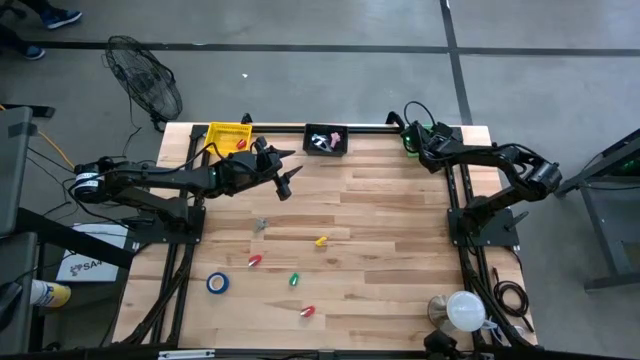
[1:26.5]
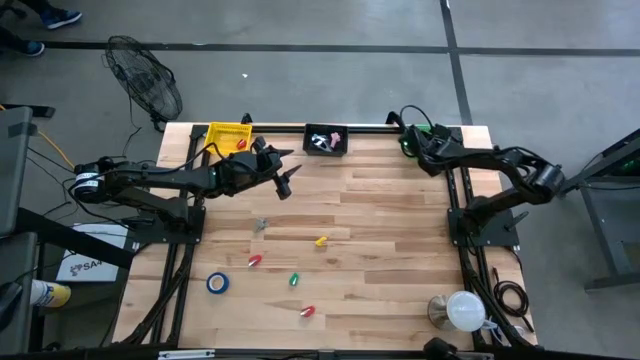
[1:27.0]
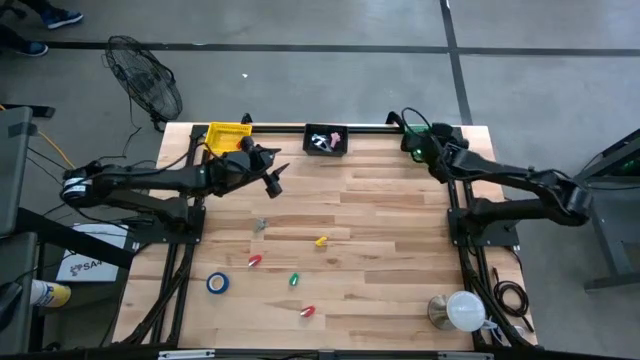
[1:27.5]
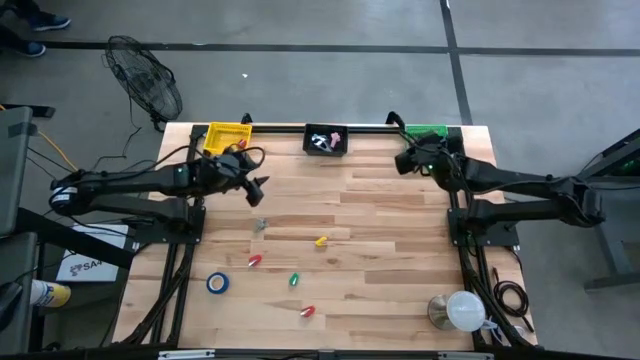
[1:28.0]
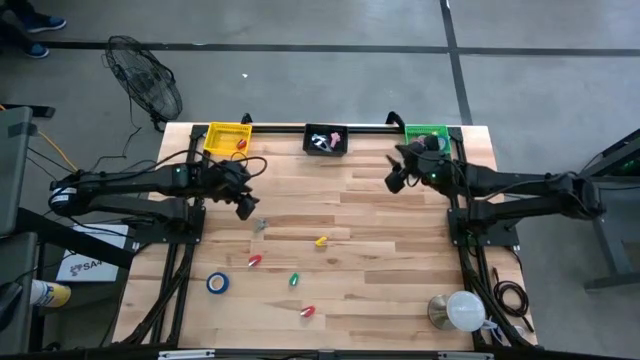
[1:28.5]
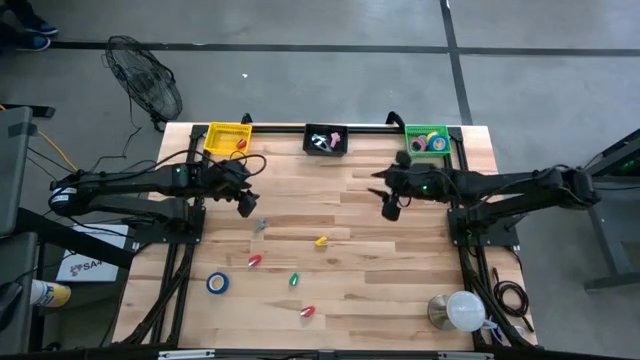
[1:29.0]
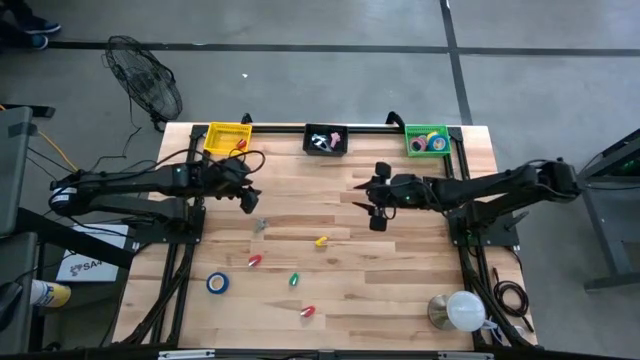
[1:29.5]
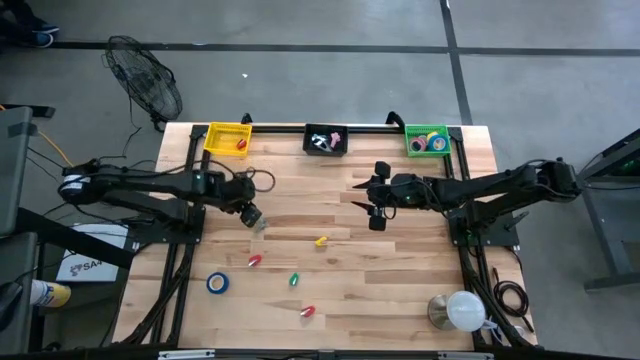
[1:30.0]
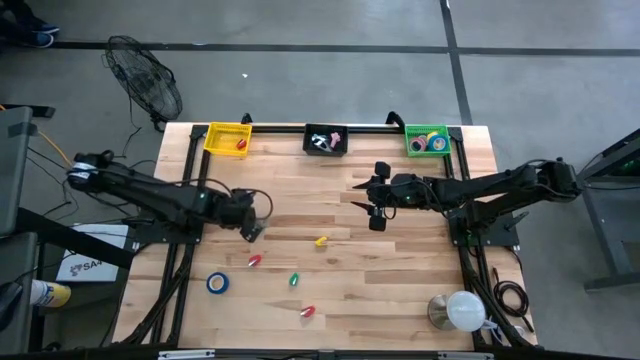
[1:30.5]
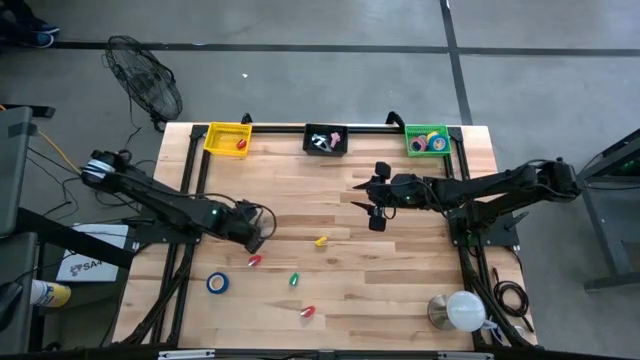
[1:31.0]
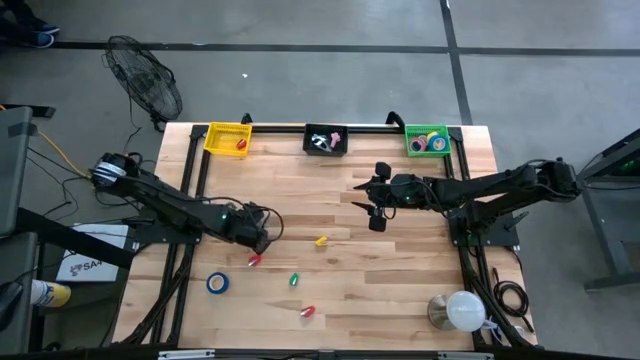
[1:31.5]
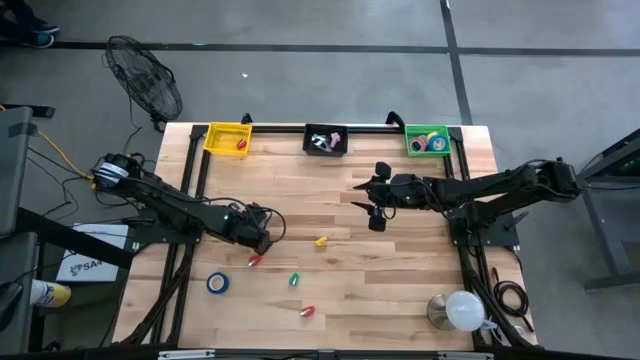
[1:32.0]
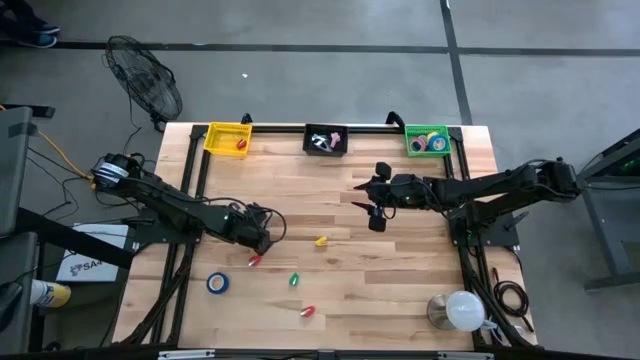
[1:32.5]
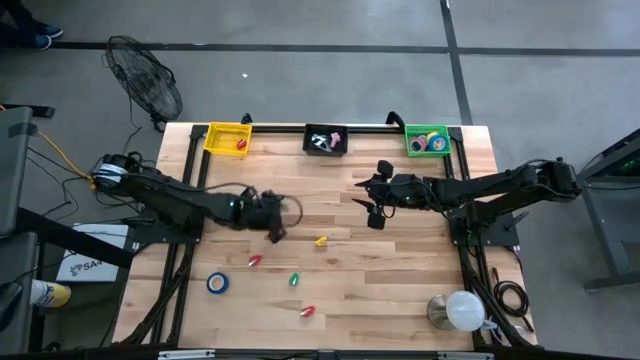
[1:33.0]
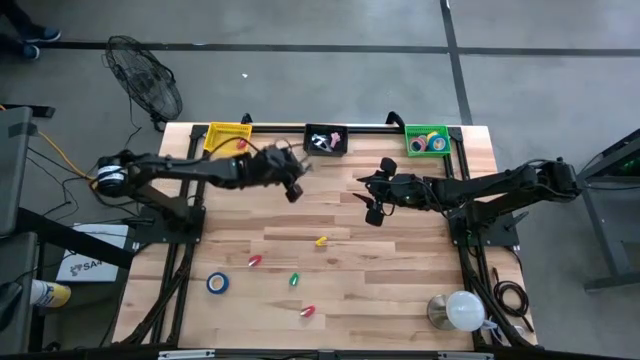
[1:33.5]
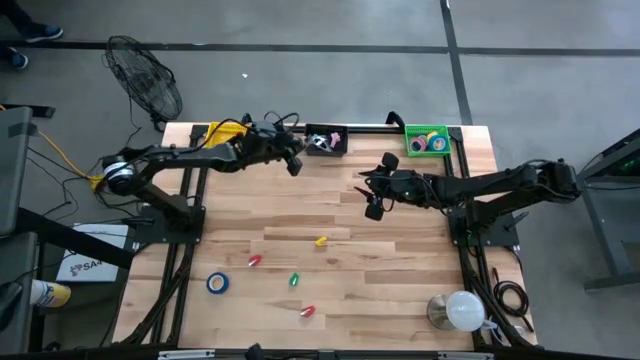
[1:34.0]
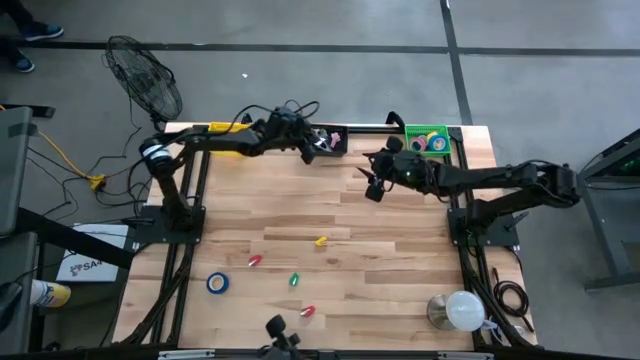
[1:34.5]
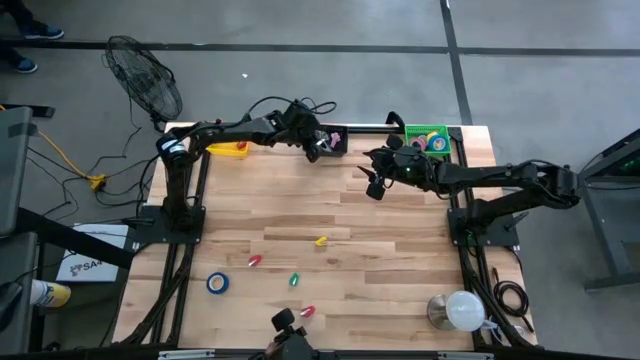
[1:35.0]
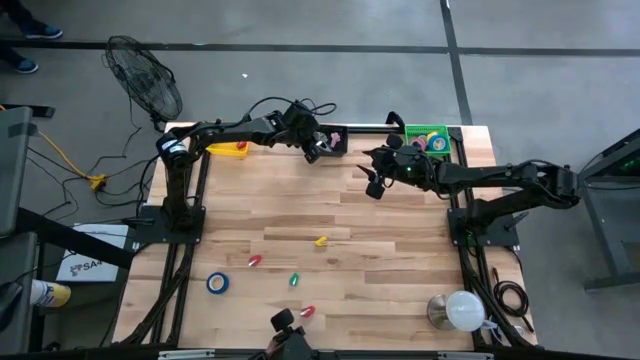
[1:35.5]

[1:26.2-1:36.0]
Task: Pick and place Stapler, Stapler remover, tape
Put the gray staple remover into the black bin

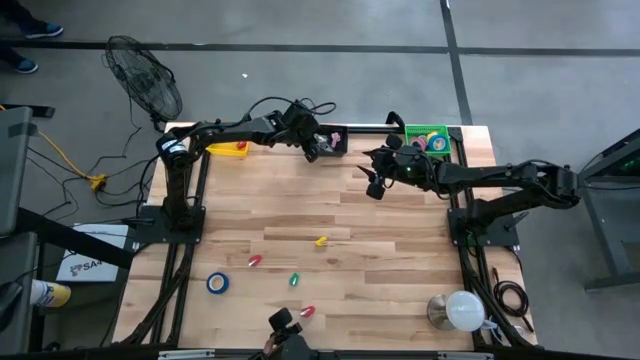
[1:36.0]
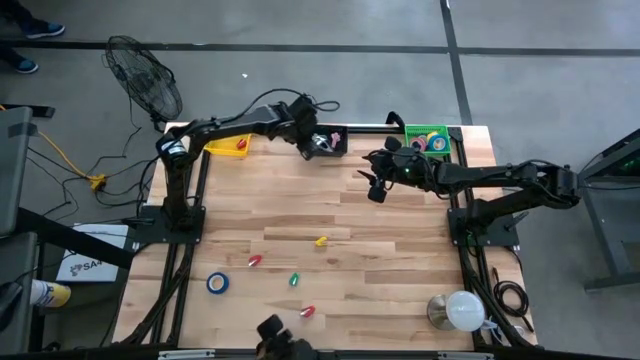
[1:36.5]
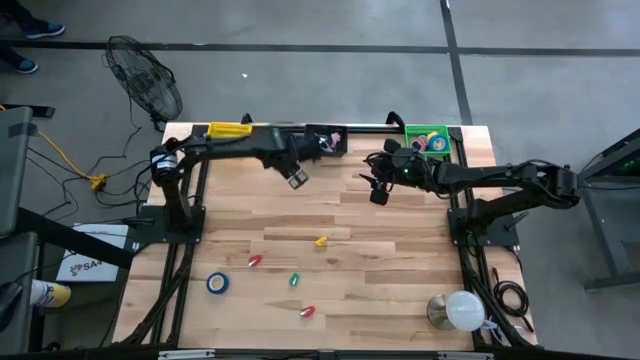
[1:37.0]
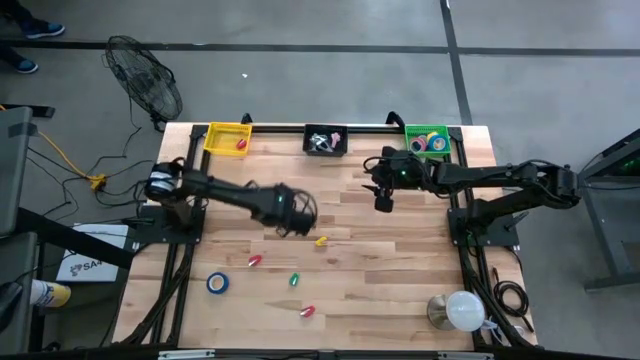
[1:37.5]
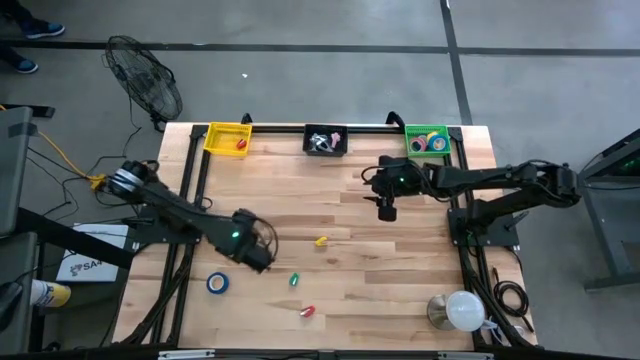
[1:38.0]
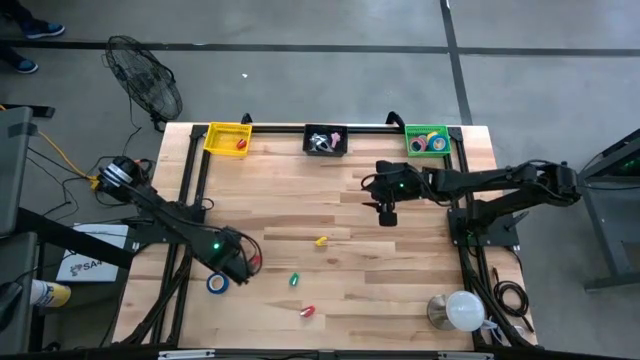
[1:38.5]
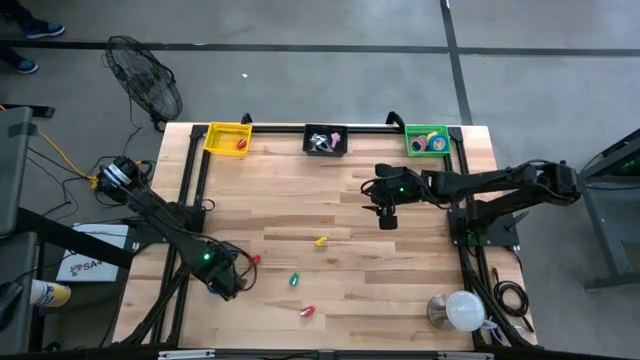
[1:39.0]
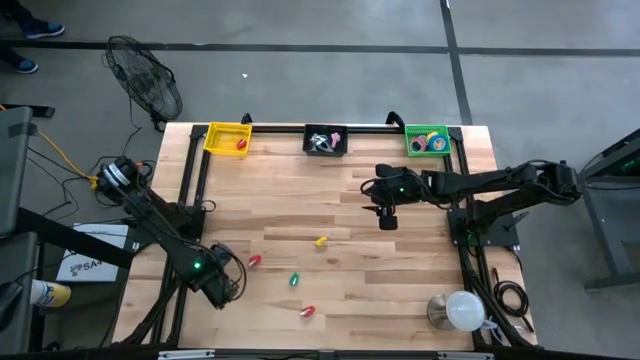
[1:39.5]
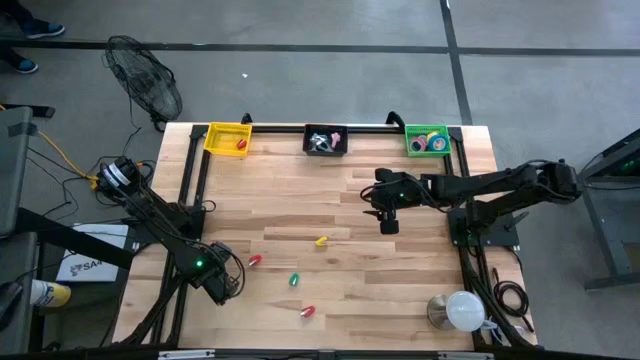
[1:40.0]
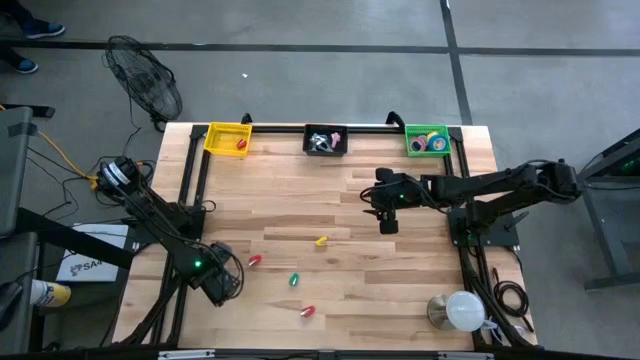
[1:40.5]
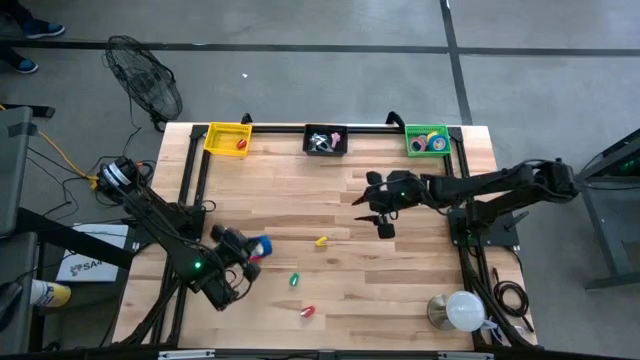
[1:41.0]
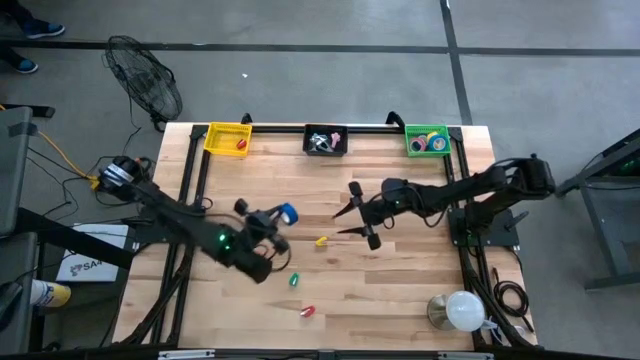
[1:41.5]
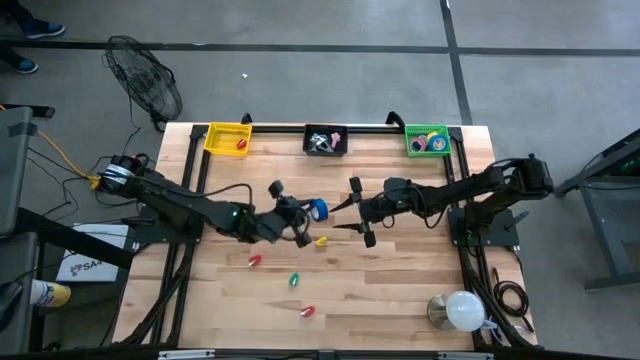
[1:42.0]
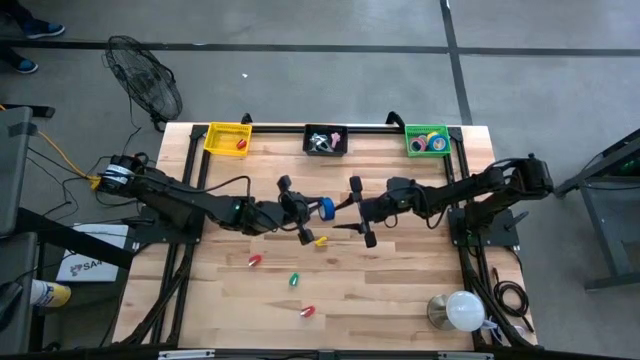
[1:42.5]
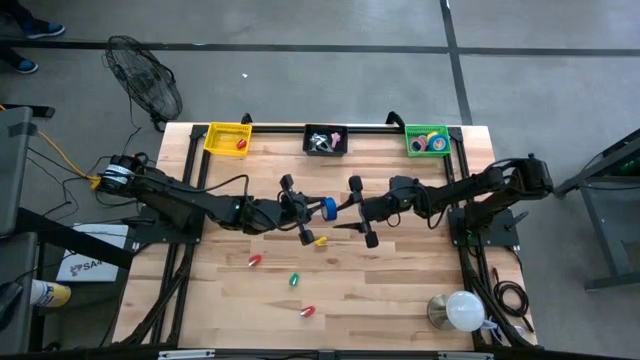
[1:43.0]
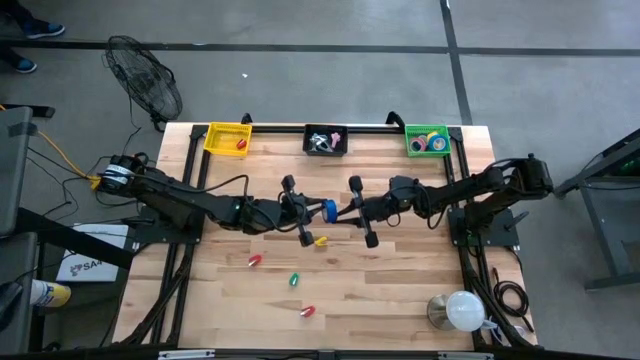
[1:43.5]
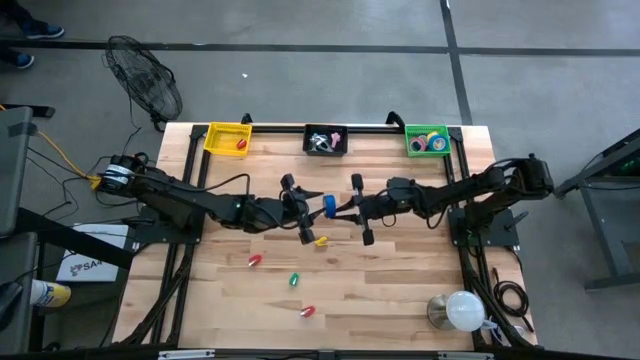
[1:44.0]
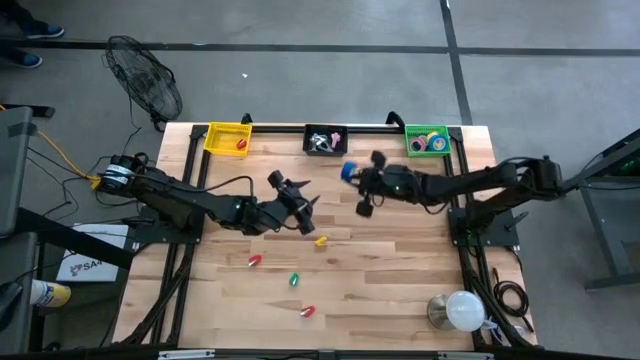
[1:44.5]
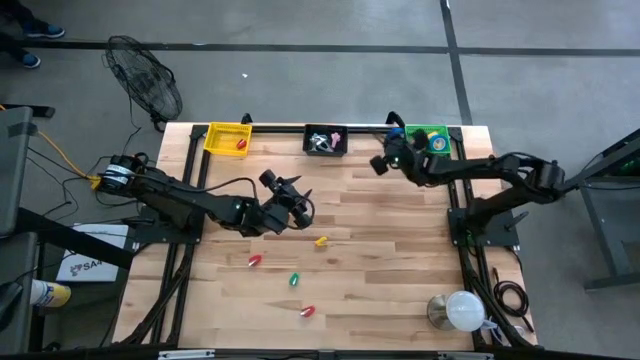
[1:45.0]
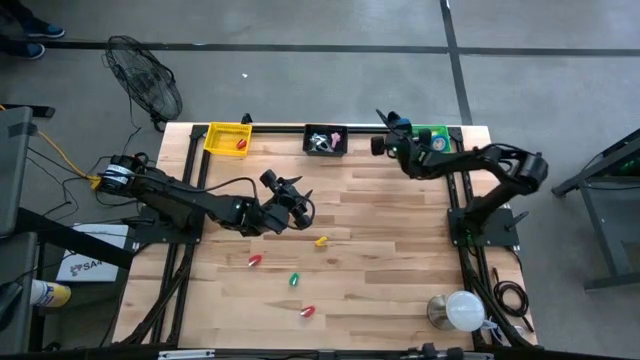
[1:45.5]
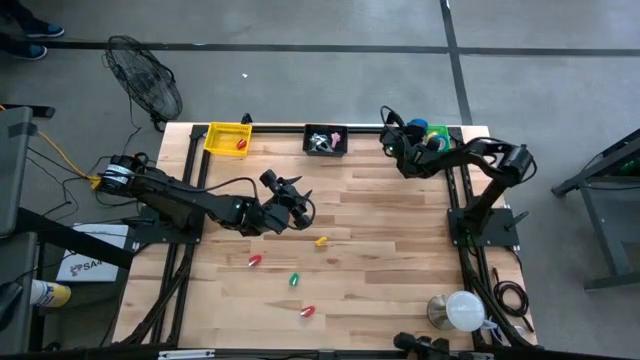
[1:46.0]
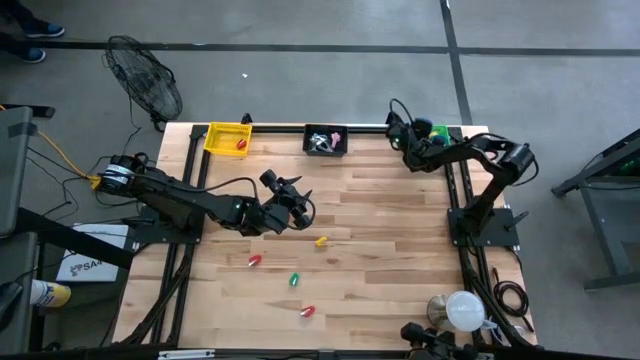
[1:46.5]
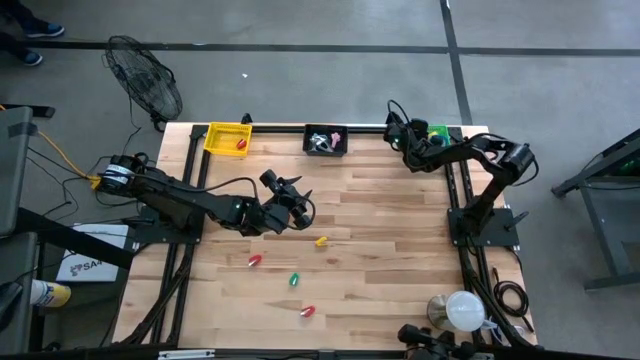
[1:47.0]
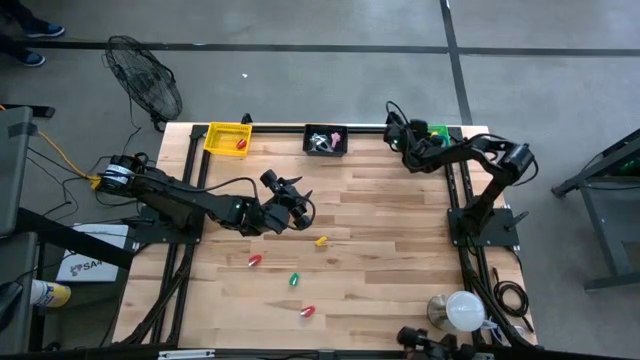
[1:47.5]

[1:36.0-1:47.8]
Put the dark blue tape into the green bin
